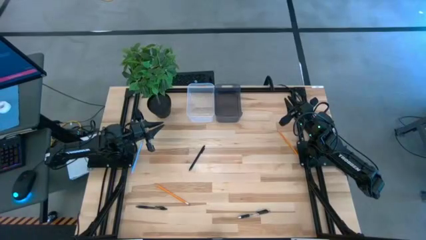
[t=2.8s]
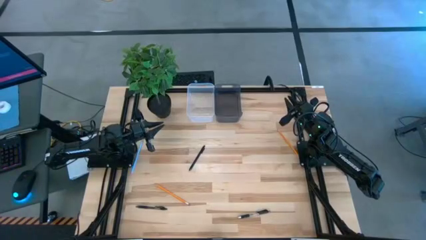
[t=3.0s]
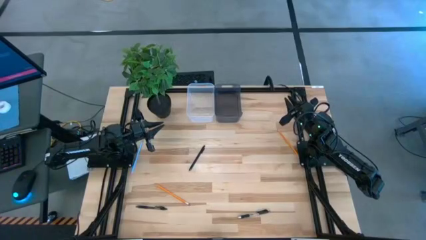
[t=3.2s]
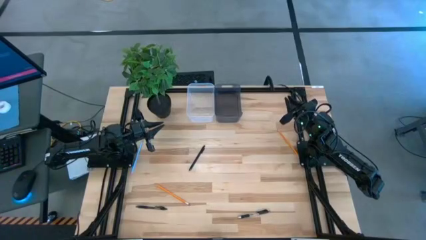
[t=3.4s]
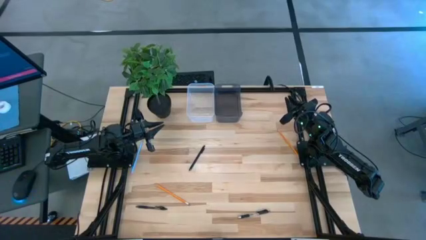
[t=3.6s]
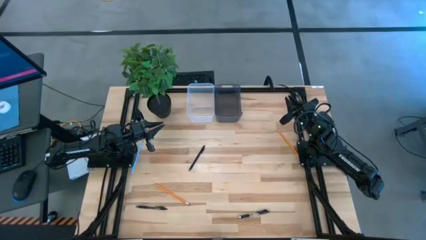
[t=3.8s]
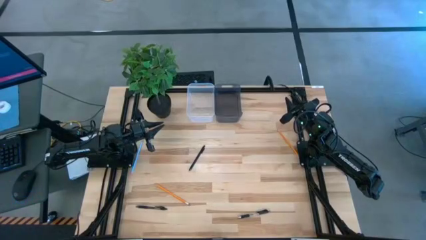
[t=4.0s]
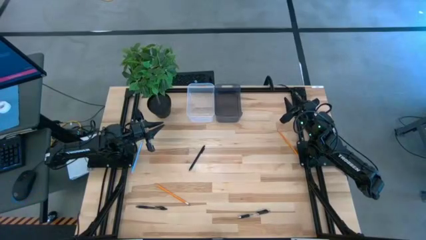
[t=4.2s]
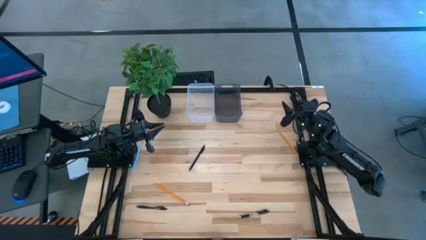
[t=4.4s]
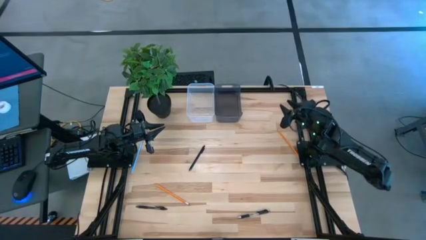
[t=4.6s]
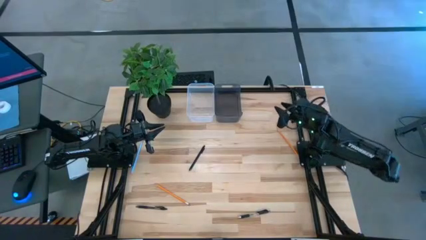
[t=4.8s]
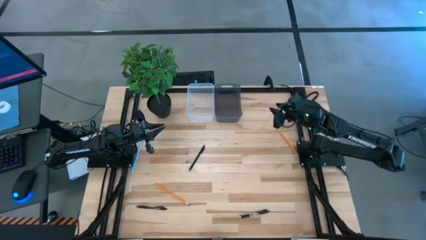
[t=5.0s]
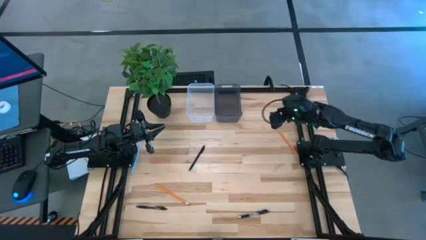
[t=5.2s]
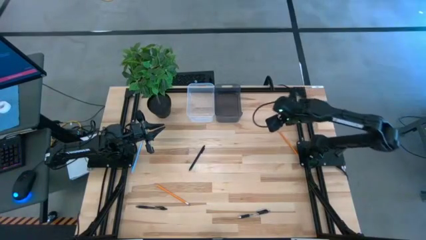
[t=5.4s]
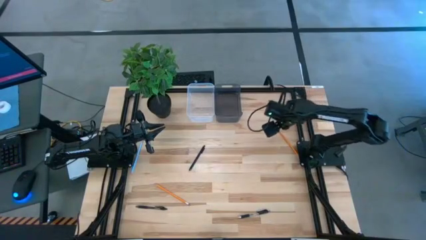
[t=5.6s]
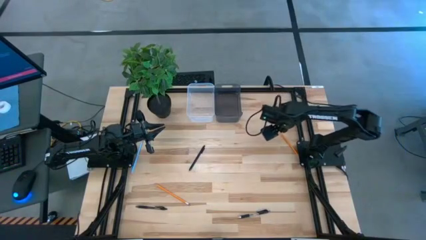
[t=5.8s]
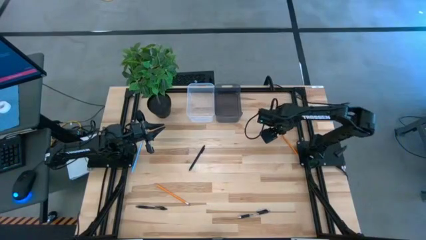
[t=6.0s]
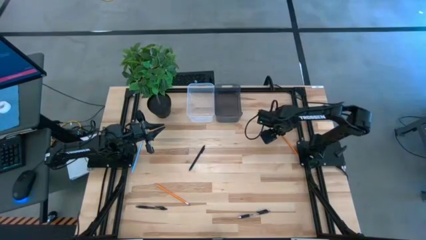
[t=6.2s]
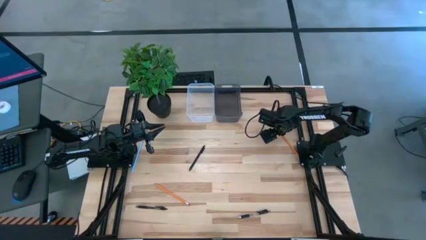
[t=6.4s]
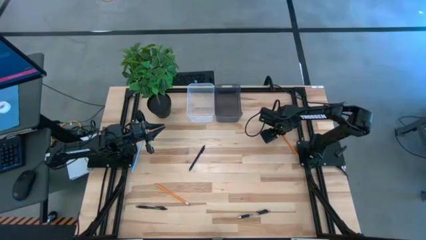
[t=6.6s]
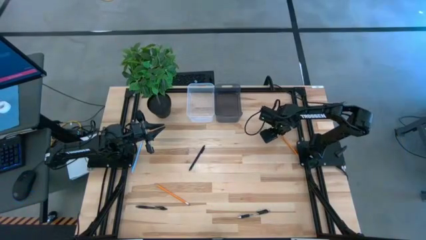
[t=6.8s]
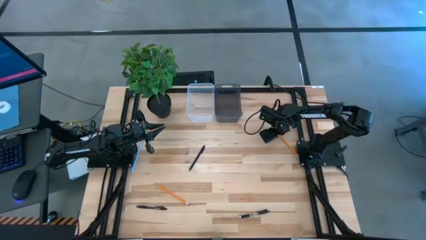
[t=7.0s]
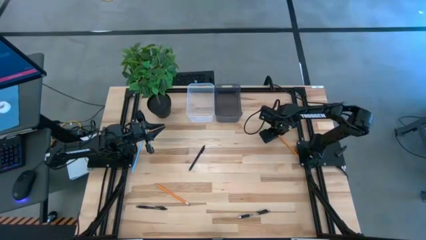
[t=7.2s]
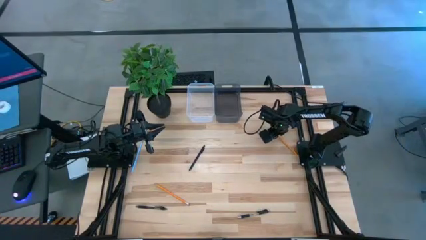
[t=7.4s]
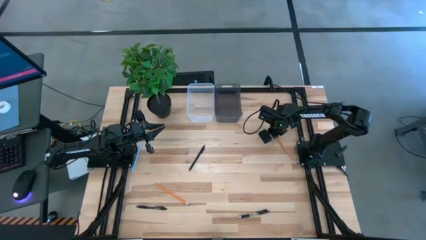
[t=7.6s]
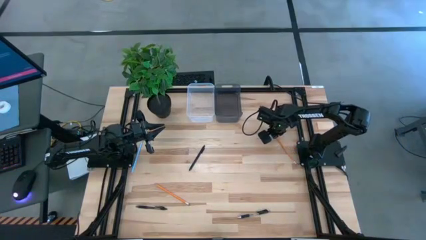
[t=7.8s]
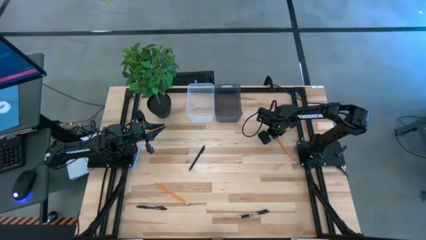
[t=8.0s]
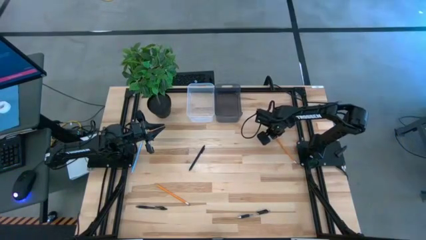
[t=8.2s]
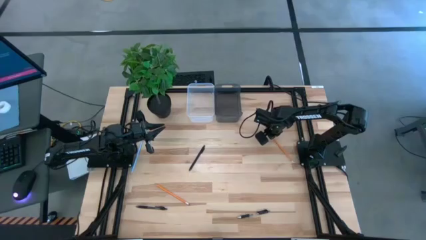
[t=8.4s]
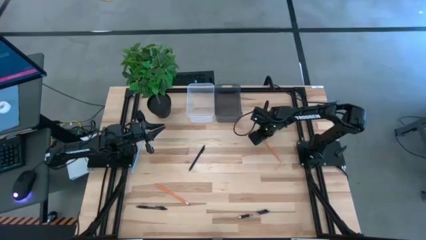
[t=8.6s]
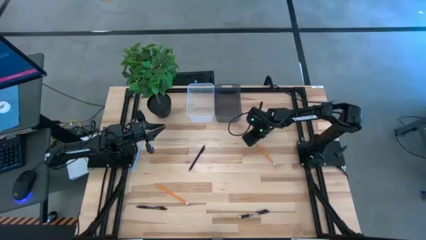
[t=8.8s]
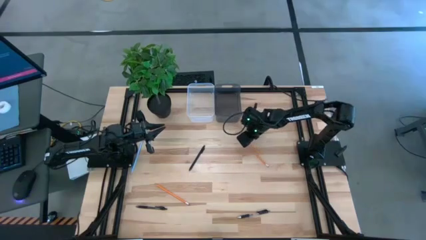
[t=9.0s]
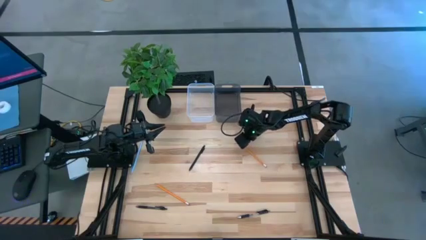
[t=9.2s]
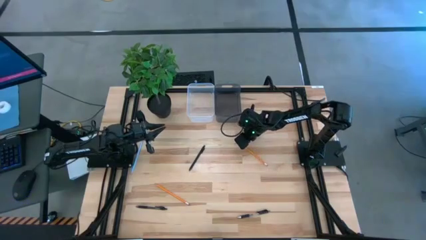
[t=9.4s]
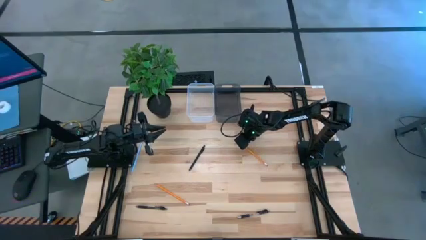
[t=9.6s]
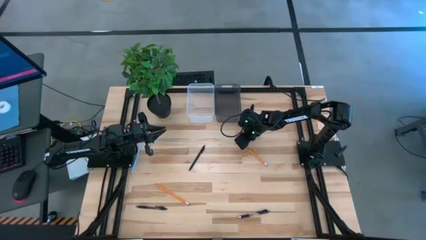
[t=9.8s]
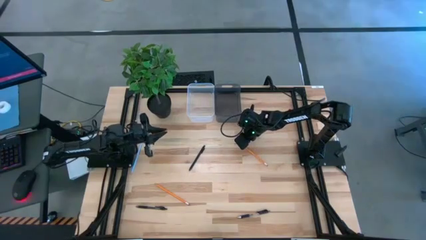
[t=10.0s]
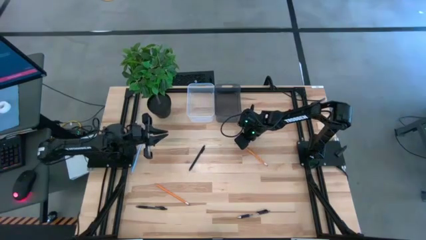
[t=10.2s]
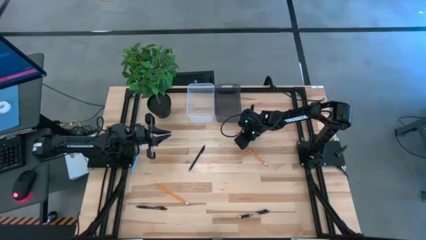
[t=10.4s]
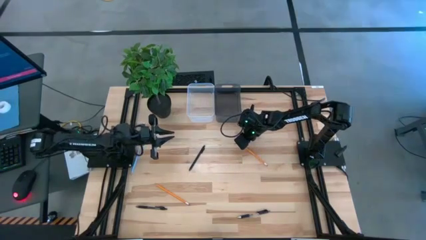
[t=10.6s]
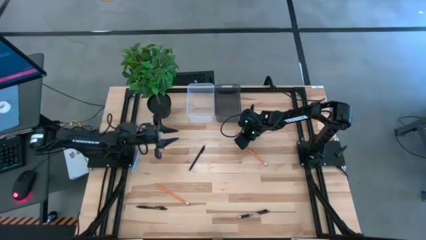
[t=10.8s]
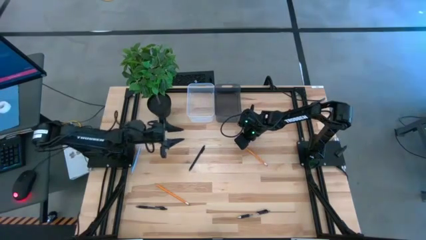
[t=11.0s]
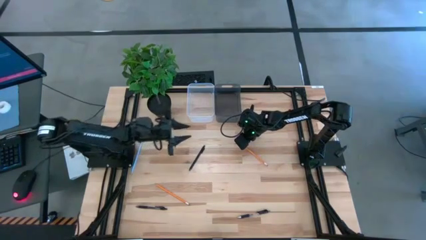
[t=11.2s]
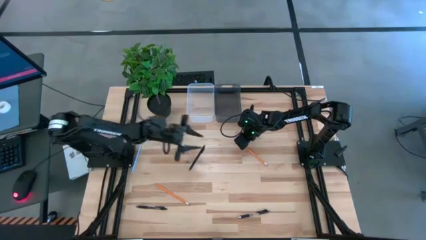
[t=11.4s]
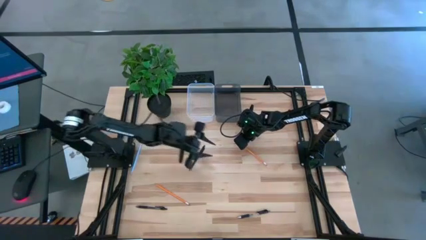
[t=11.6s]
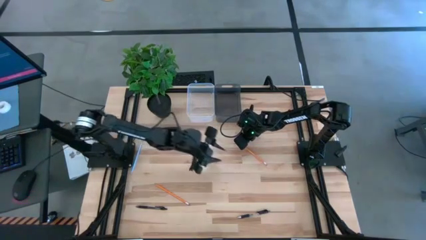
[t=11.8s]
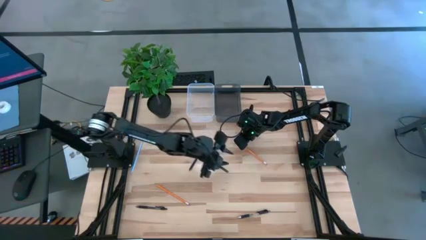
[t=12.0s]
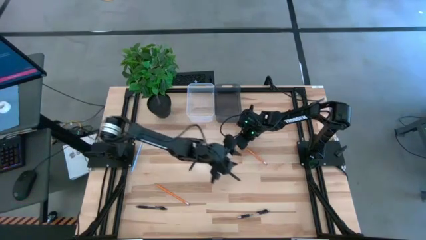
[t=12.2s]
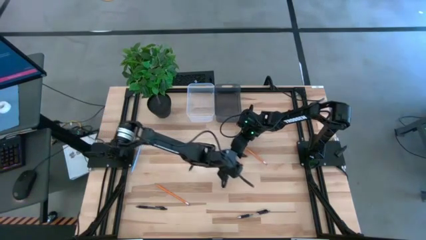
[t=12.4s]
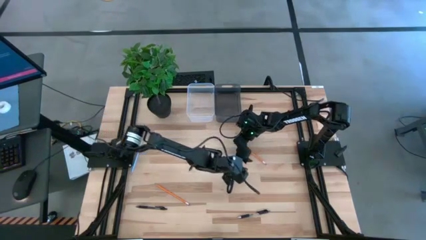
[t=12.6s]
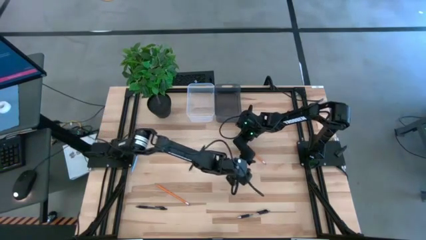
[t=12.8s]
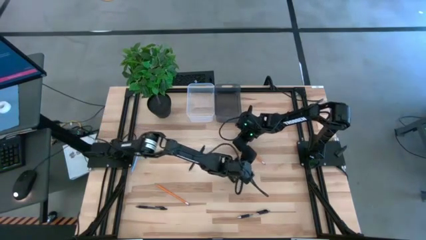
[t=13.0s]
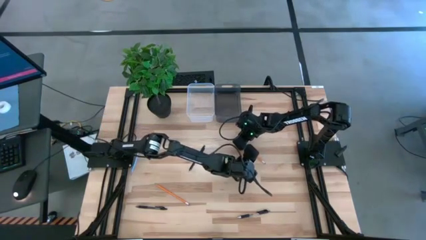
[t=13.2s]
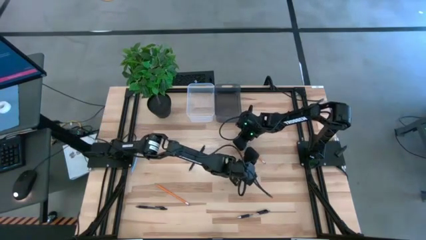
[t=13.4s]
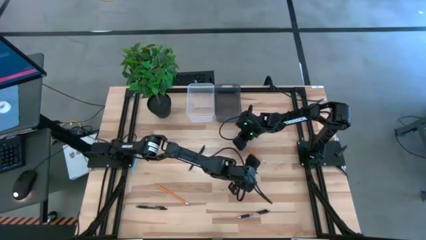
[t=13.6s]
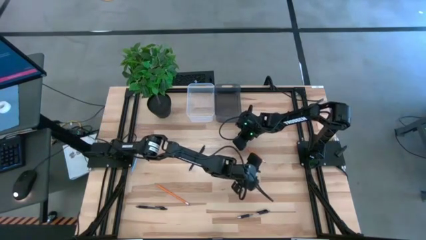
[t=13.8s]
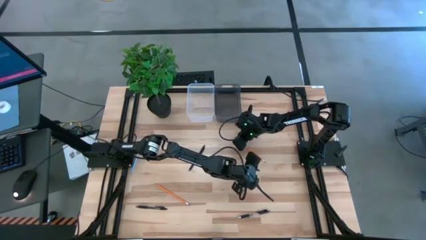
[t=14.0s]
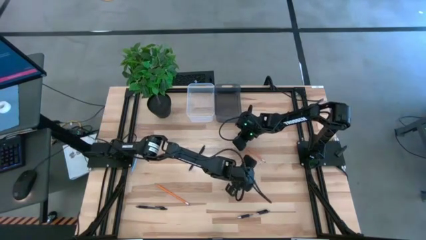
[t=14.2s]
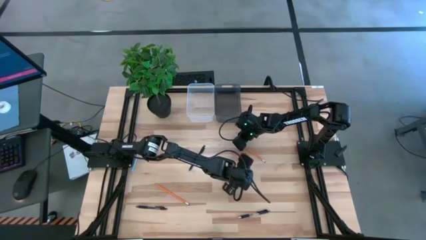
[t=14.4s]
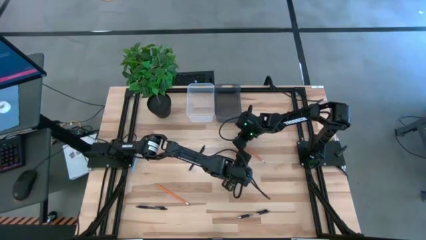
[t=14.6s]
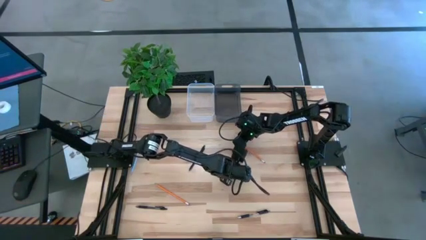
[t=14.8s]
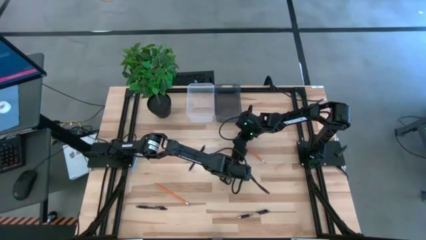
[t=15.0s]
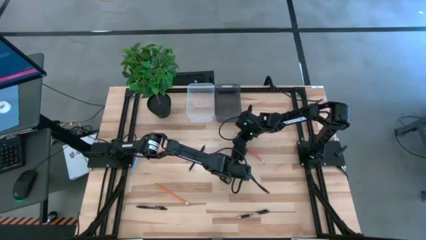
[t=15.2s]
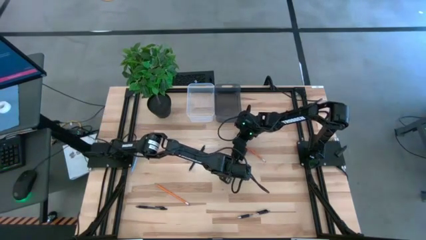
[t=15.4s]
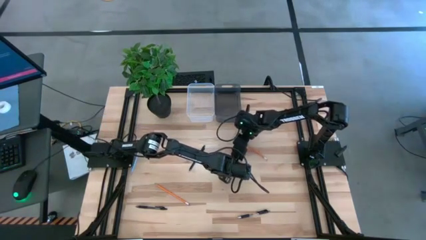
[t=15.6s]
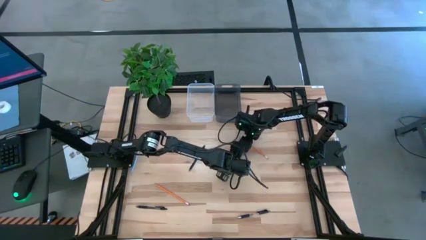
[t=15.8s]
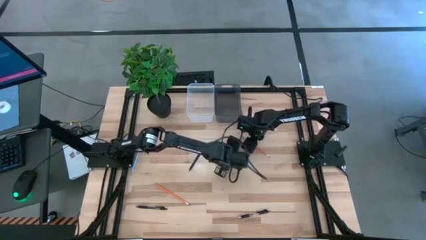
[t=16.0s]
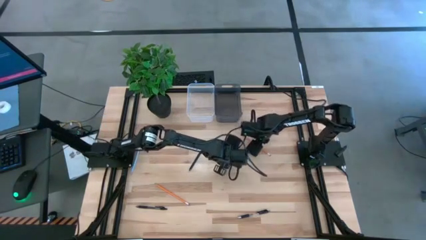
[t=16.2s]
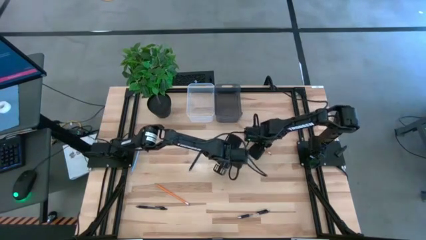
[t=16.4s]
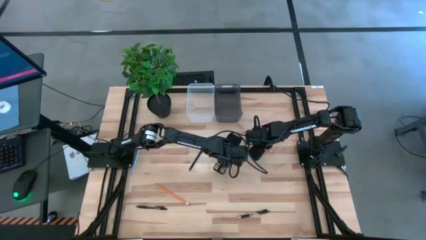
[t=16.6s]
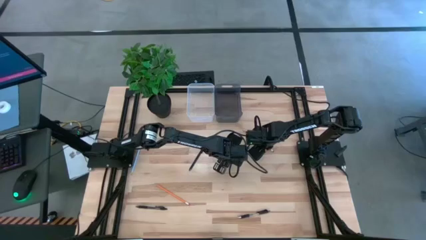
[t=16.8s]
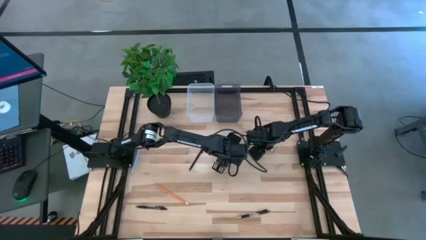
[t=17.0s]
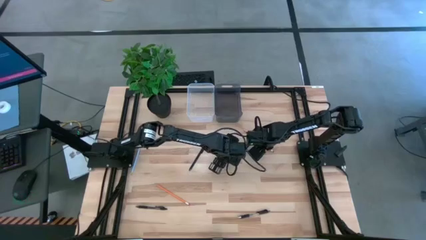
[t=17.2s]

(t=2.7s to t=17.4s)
Task: Sort pens & pencils
Put the top orange pencil into the transparent bin
